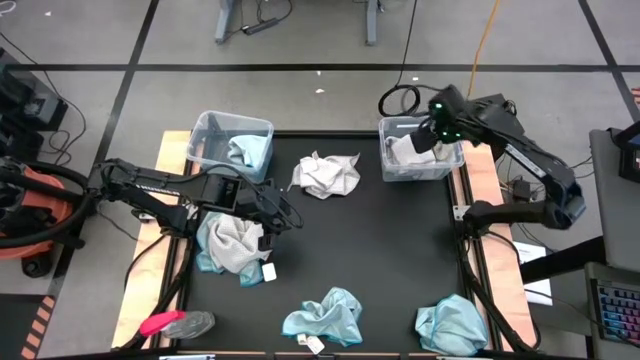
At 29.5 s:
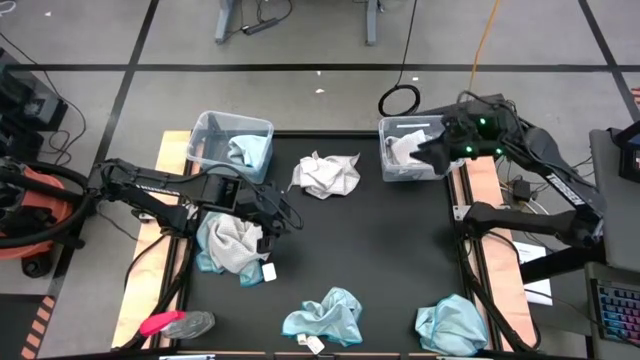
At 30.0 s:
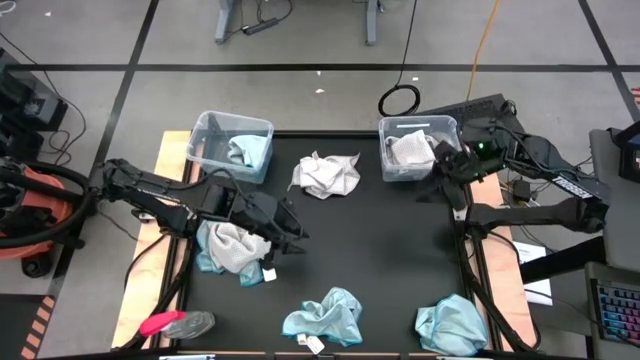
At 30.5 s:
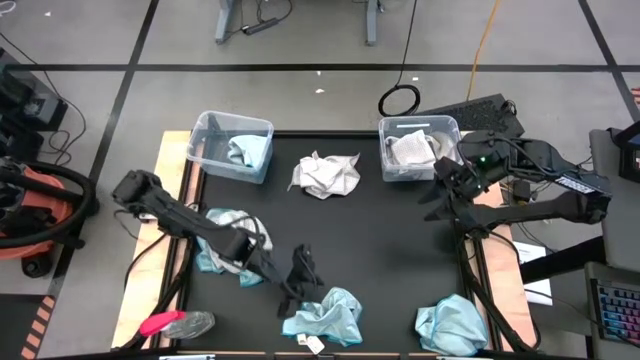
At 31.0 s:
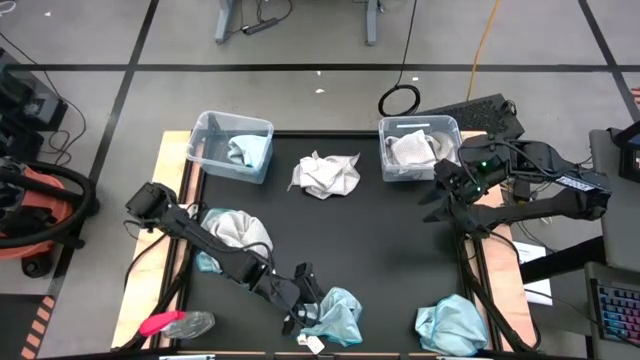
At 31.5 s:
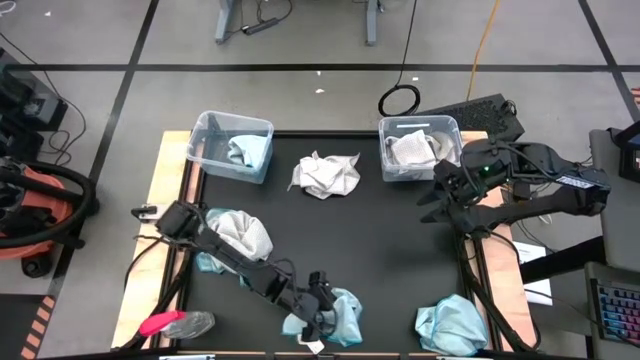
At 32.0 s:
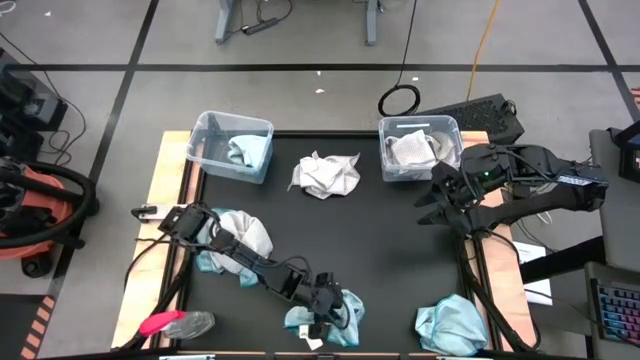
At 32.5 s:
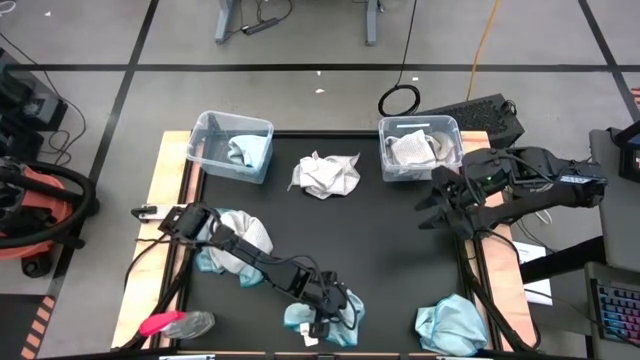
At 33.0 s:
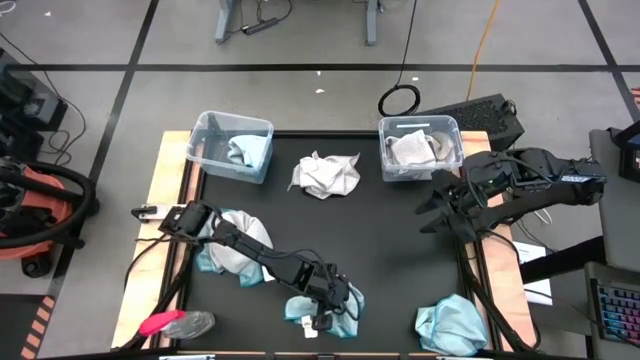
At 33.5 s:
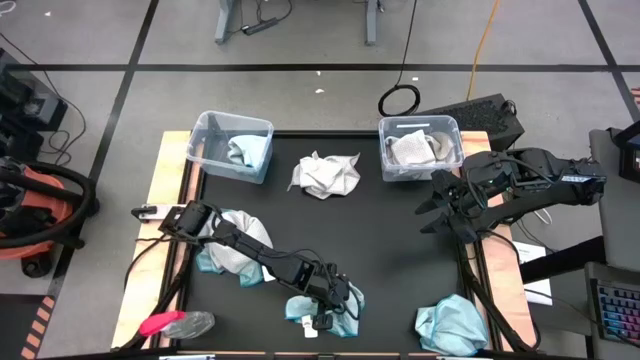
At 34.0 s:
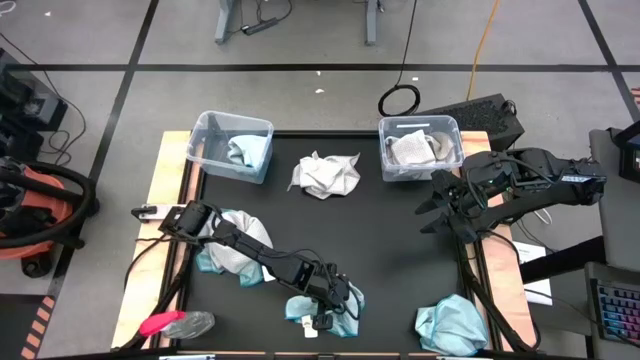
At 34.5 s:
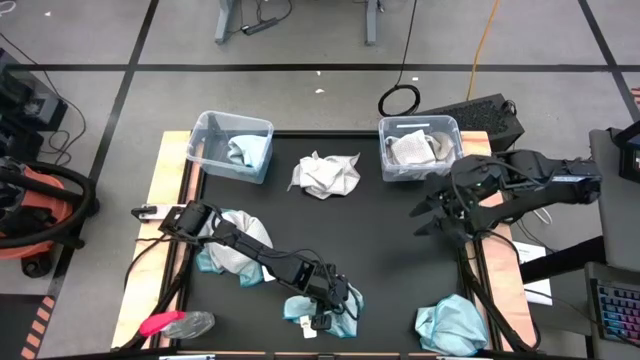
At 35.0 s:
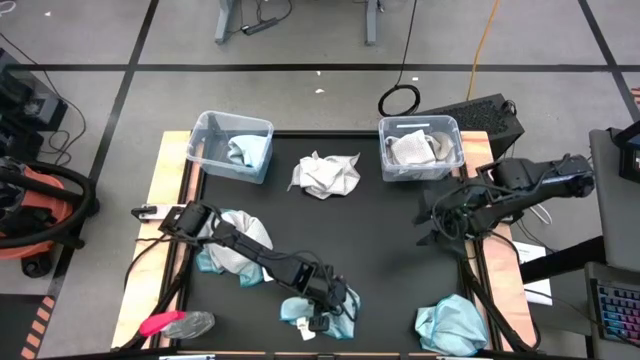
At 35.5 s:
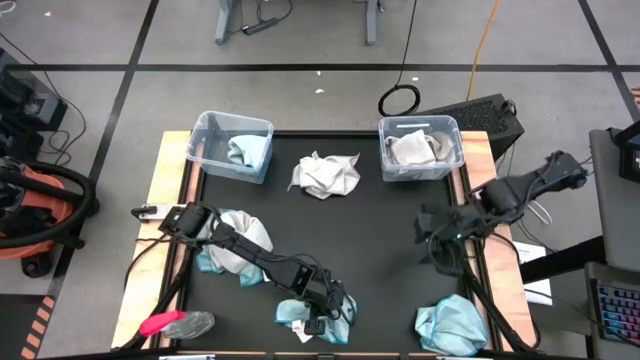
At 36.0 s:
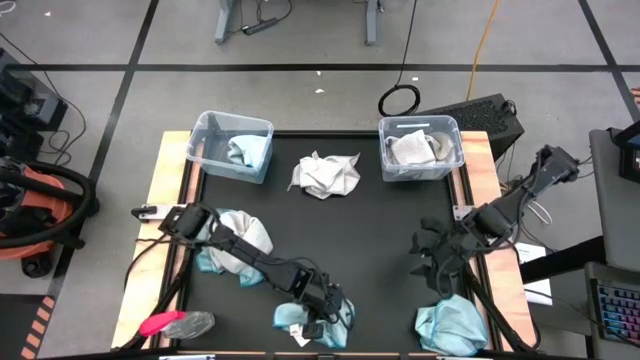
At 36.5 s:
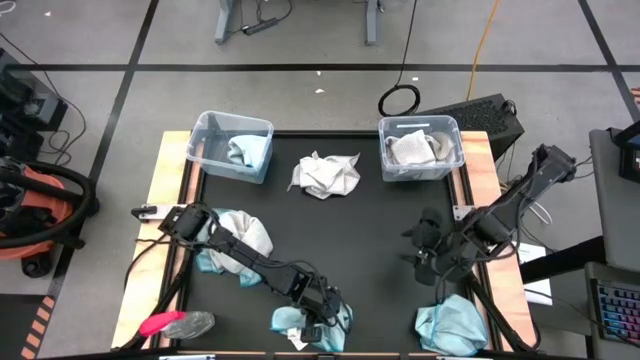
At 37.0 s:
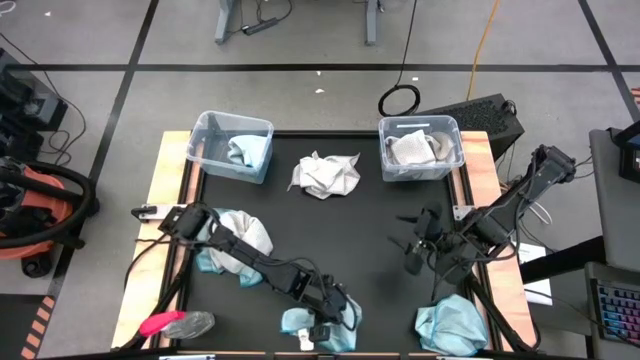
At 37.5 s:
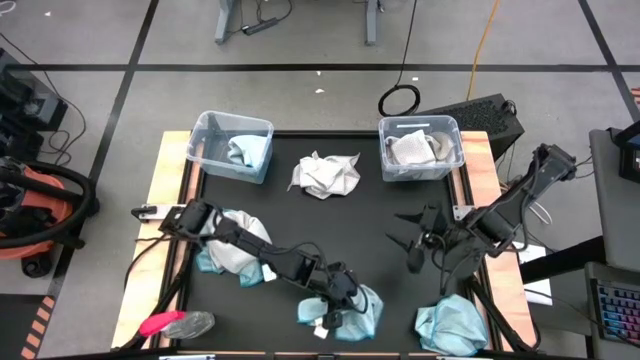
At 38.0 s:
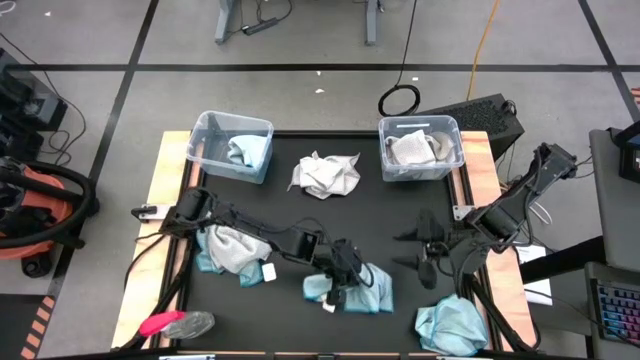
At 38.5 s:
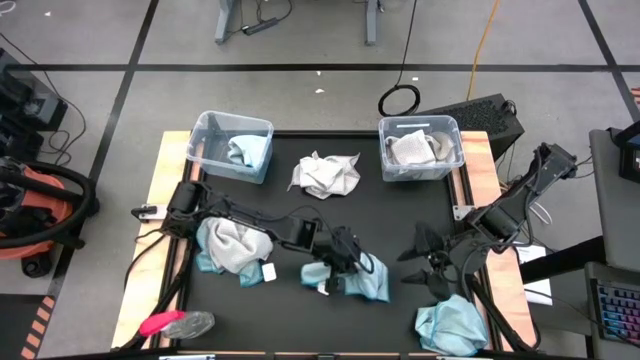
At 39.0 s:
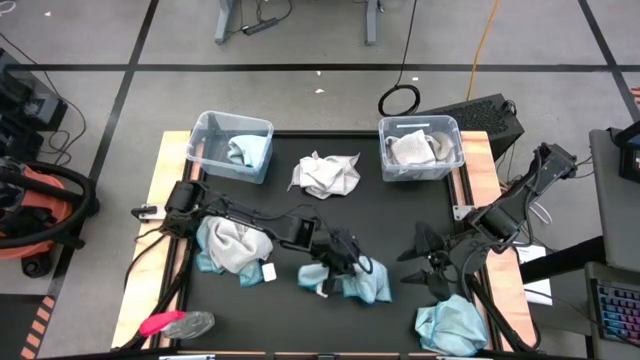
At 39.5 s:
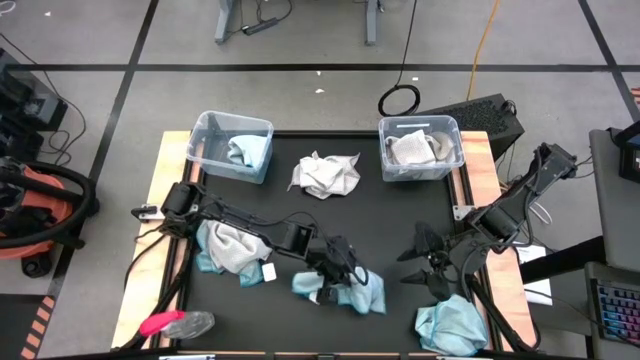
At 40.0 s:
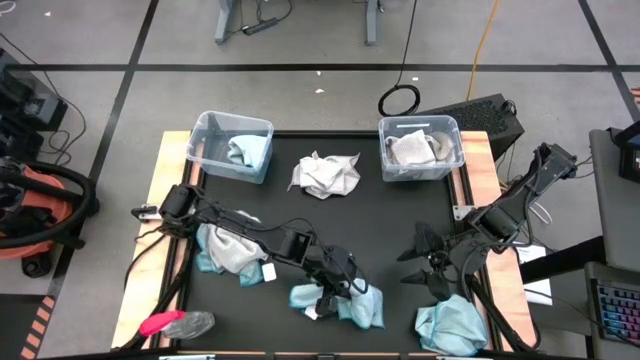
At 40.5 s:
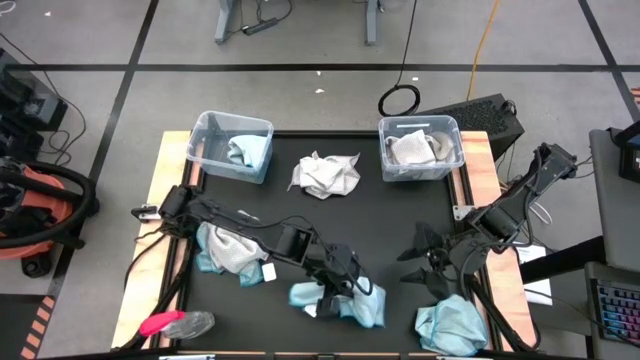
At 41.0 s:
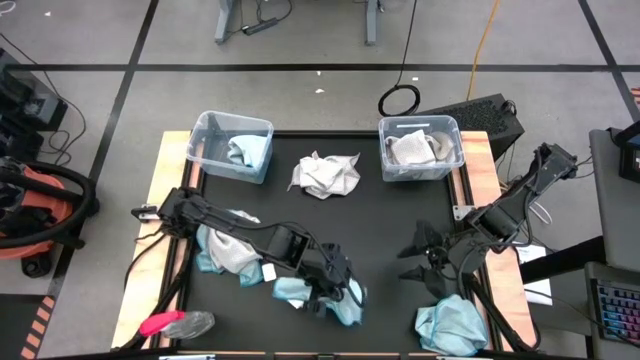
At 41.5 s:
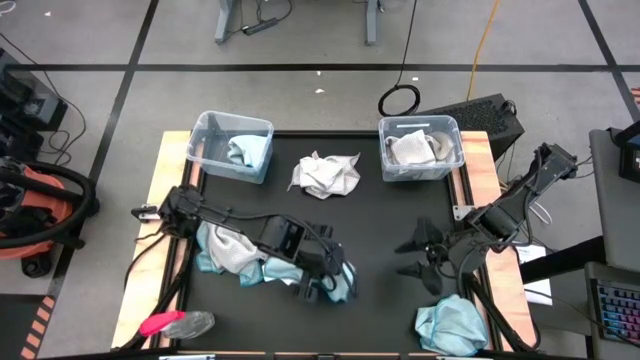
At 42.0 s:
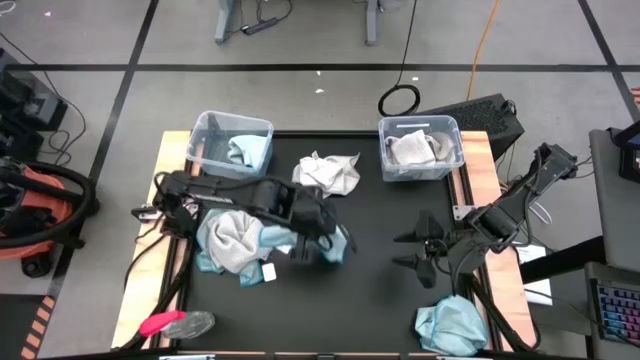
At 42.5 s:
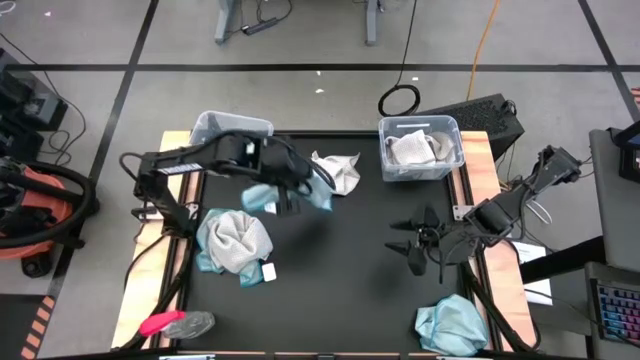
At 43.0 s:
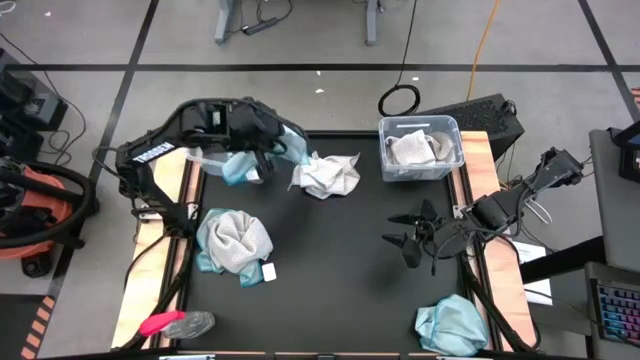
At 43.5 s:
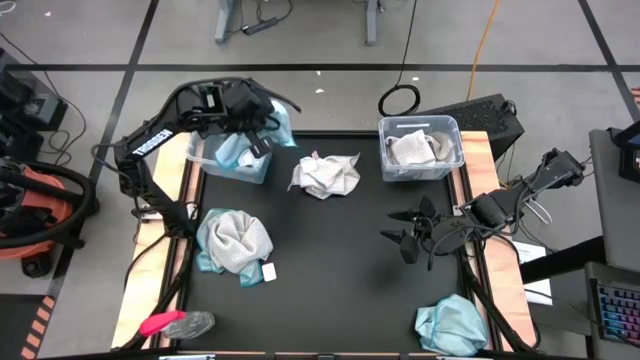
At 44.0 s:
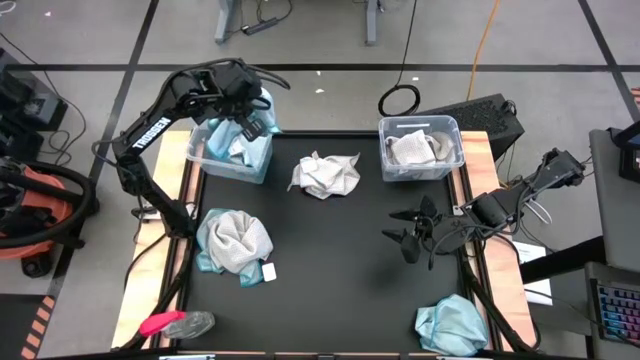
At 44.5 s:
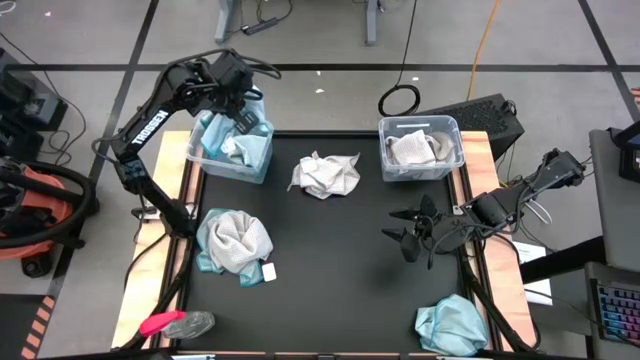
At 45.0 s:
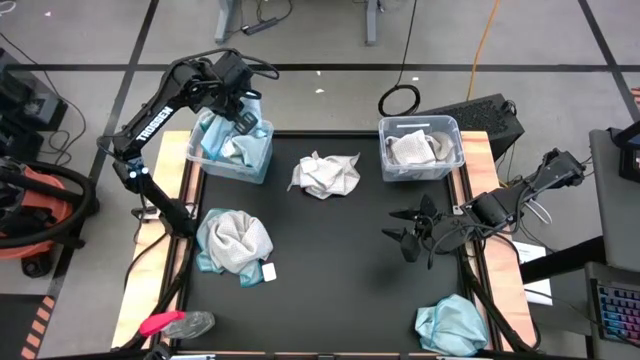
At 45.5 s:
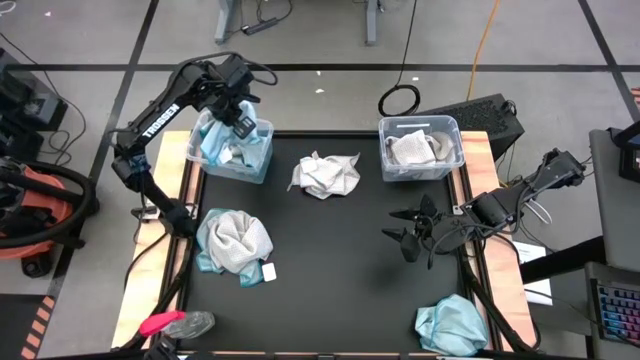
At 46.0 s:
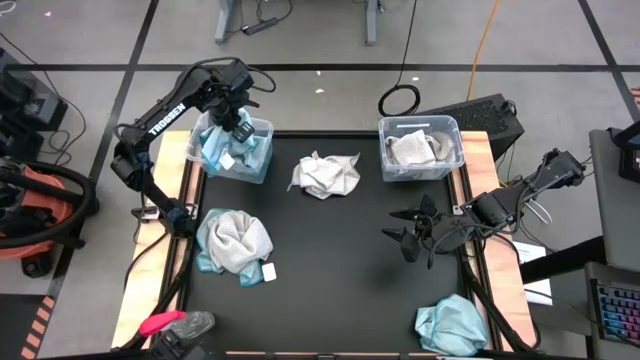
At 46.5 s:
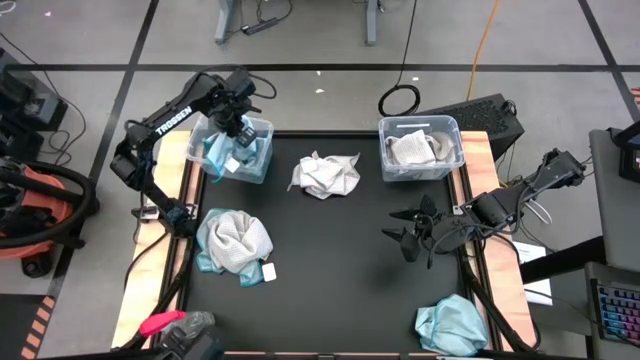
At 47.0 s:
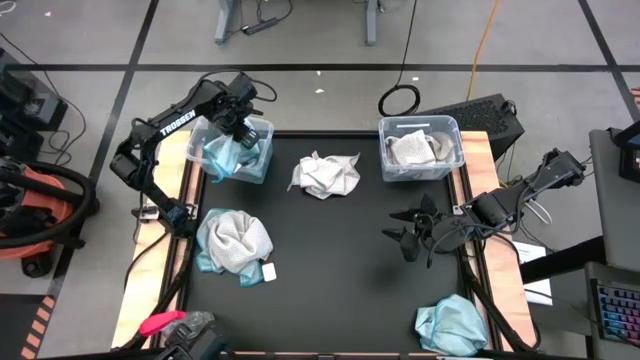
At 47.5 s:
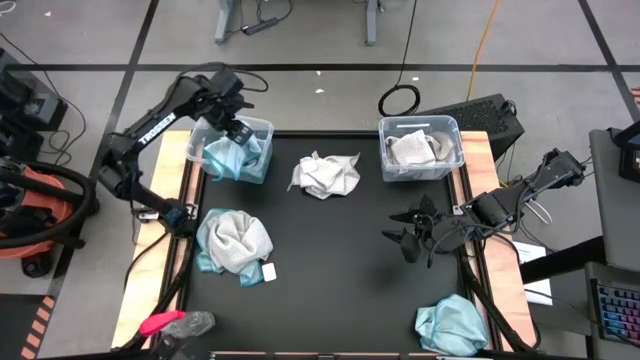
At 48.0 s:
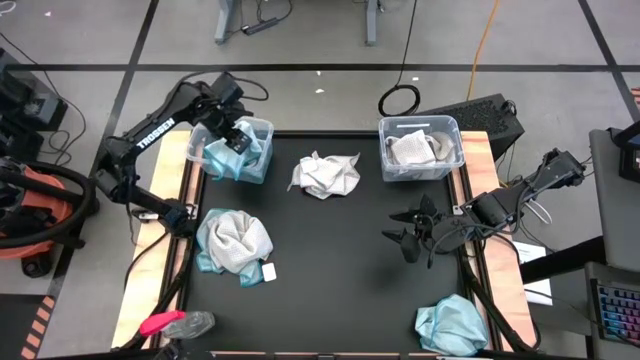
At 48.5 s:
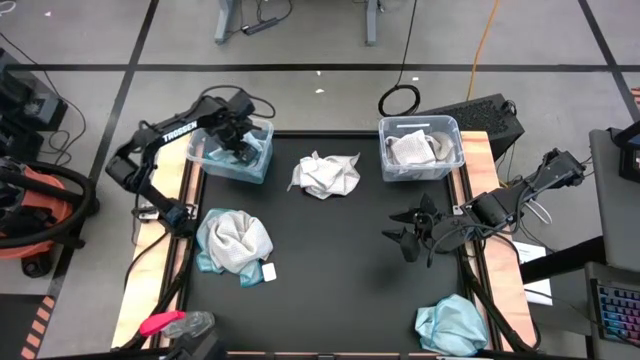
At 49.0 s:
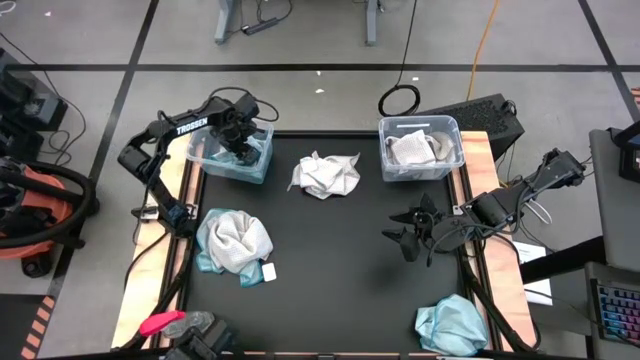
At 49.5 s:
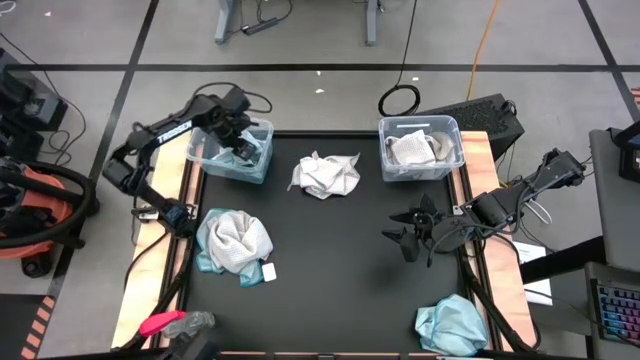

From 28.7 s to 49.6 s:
Task: Sort microfiber towel by color & place in baskets
Put the blue microfiber towel into the left transparent bin

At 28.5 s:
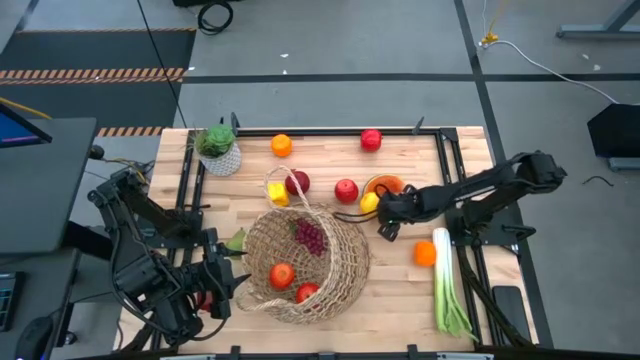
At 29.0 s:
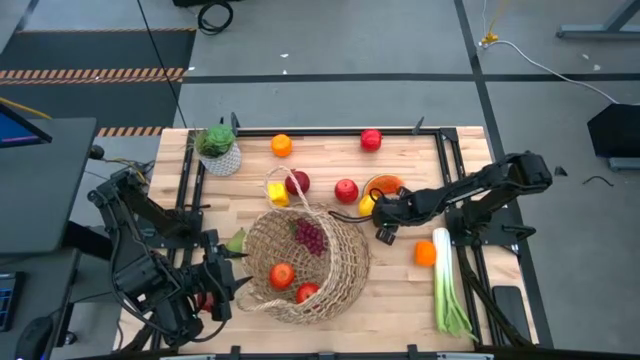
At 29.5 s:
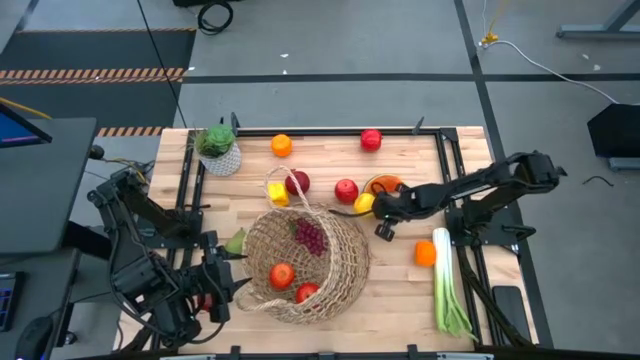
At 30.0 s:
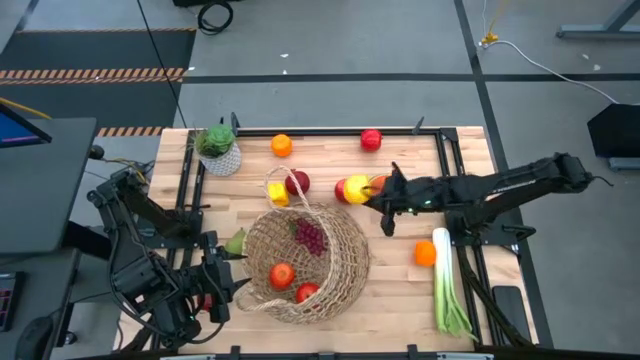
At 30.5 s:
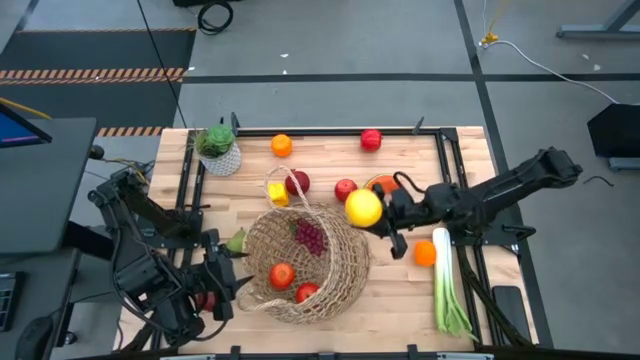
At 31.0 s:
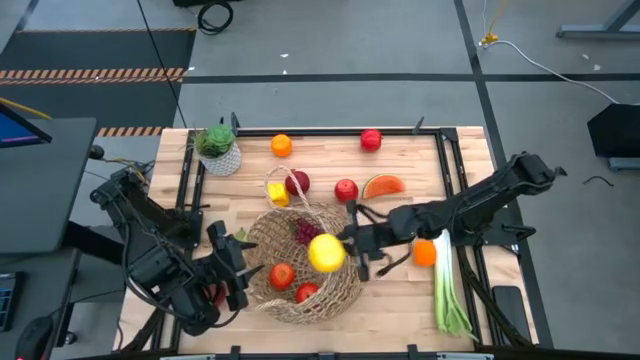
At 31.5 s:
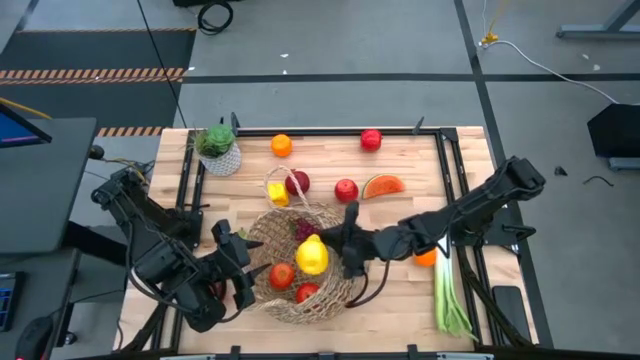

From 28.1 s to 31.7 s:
Task: Build produce basket
Put the pear into the basket
